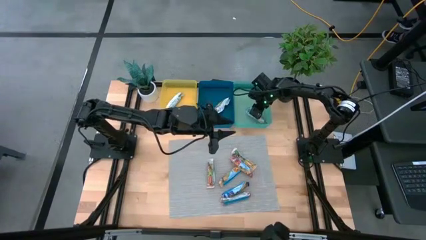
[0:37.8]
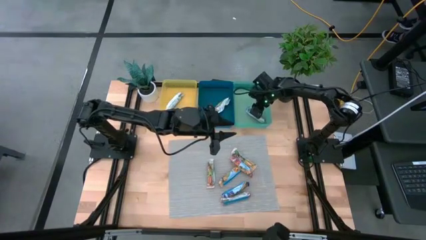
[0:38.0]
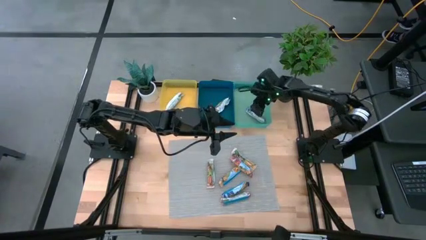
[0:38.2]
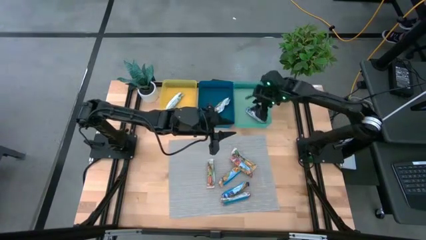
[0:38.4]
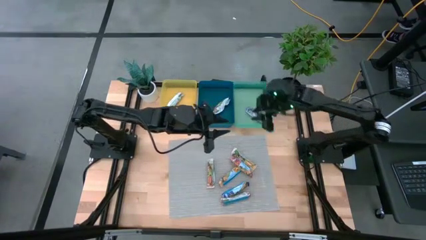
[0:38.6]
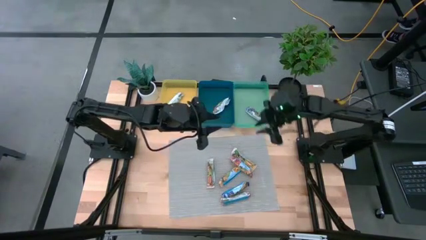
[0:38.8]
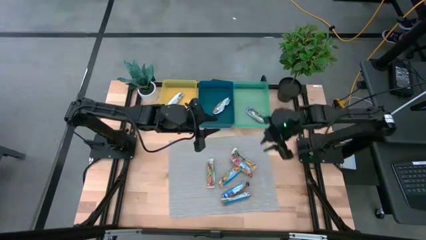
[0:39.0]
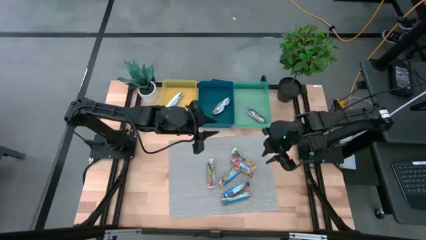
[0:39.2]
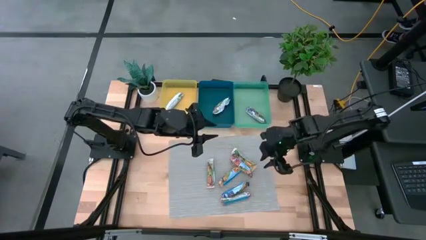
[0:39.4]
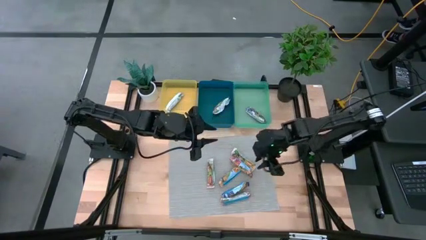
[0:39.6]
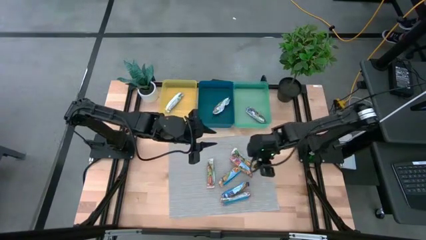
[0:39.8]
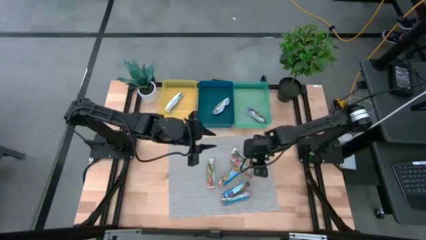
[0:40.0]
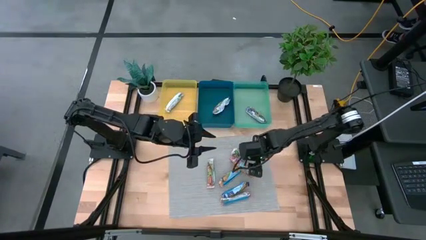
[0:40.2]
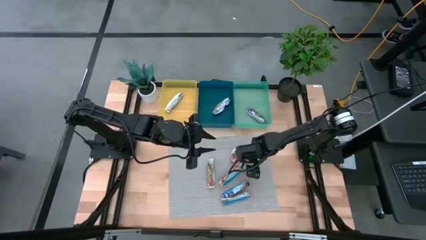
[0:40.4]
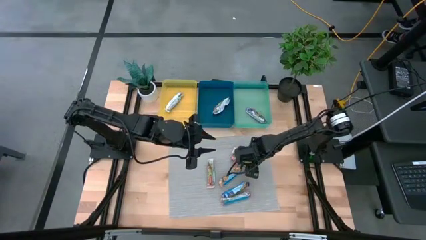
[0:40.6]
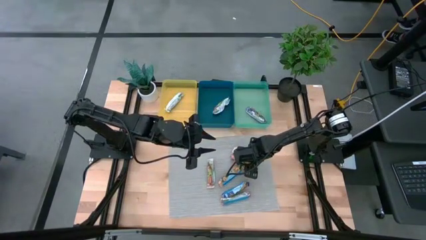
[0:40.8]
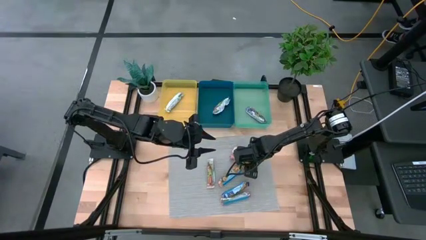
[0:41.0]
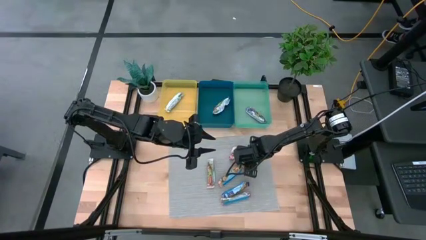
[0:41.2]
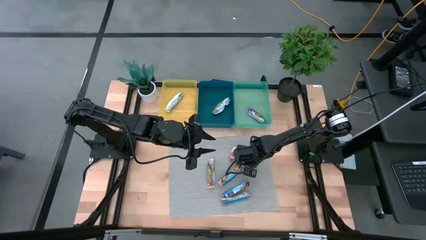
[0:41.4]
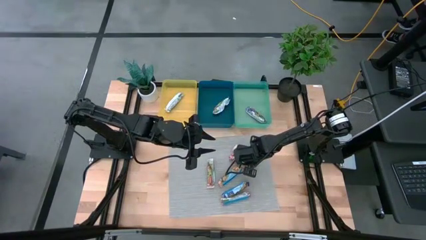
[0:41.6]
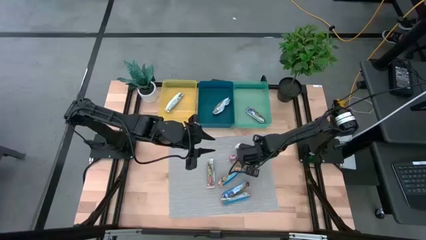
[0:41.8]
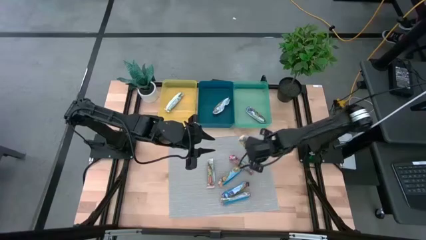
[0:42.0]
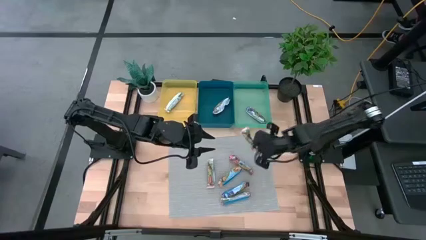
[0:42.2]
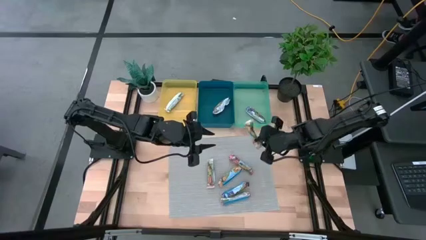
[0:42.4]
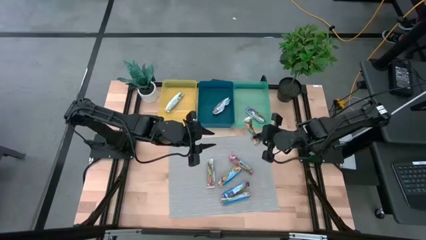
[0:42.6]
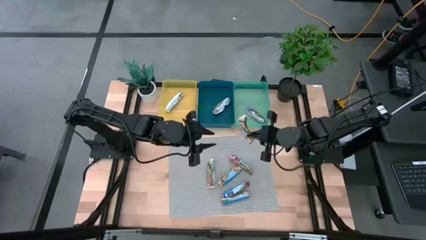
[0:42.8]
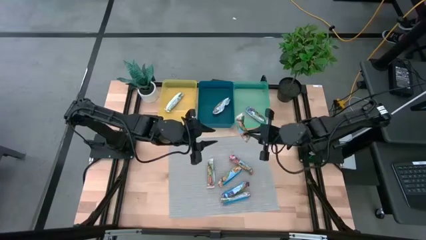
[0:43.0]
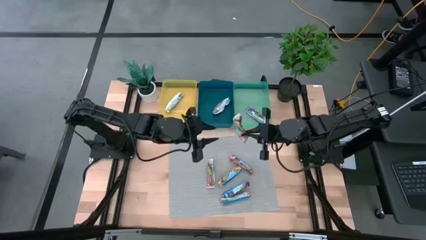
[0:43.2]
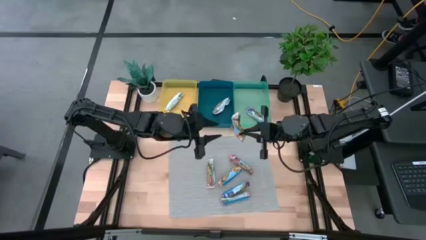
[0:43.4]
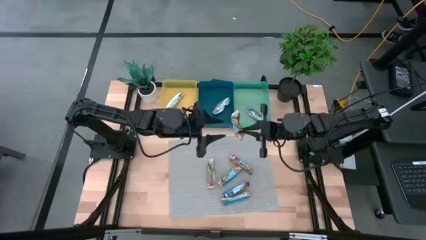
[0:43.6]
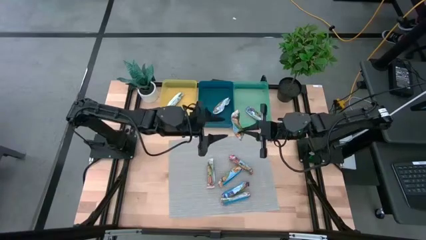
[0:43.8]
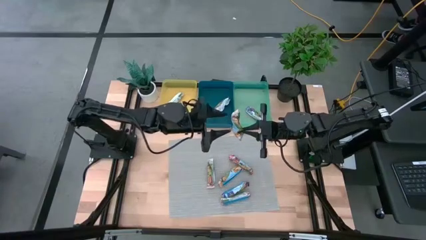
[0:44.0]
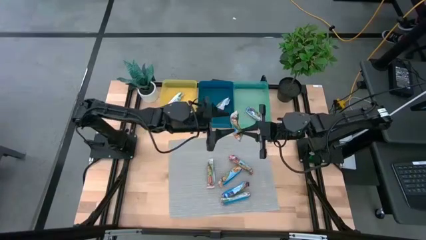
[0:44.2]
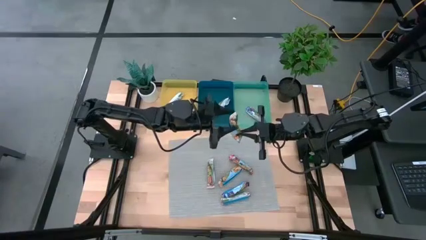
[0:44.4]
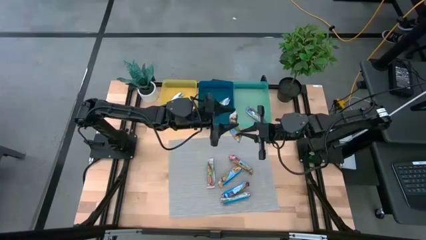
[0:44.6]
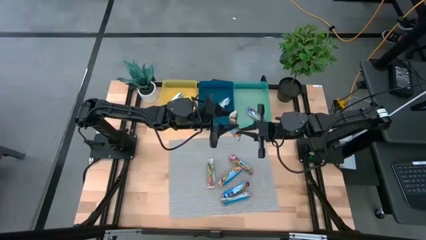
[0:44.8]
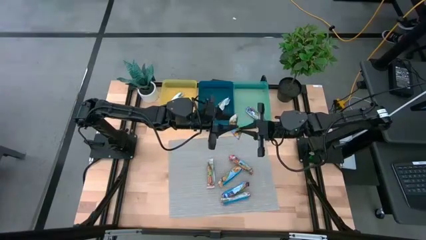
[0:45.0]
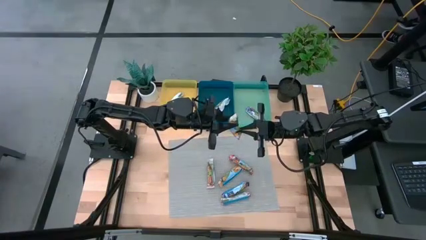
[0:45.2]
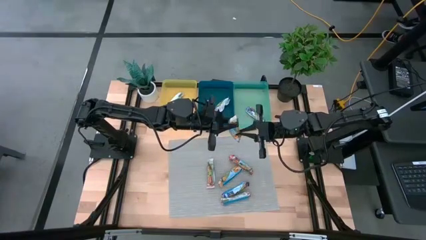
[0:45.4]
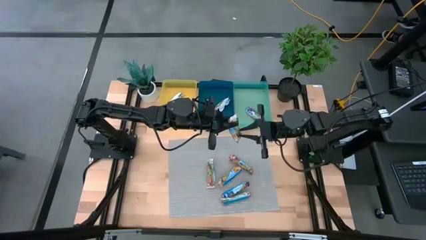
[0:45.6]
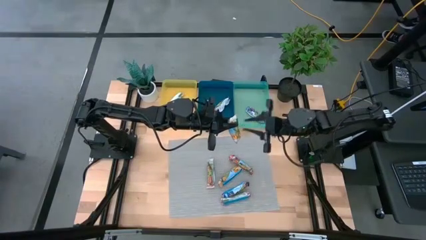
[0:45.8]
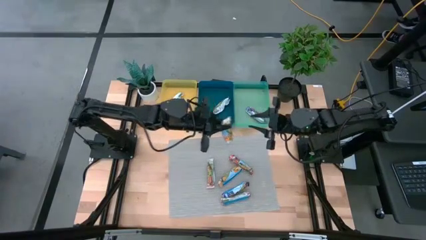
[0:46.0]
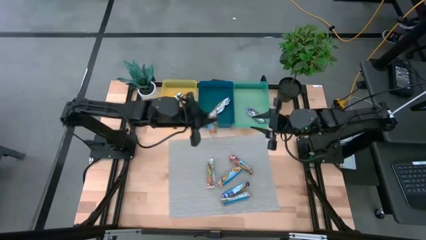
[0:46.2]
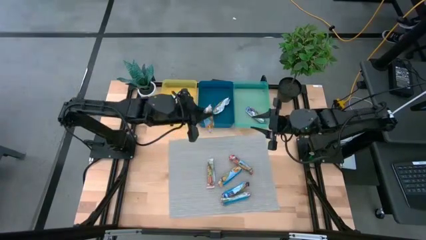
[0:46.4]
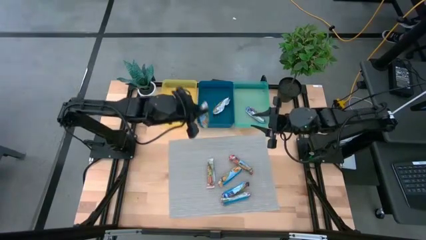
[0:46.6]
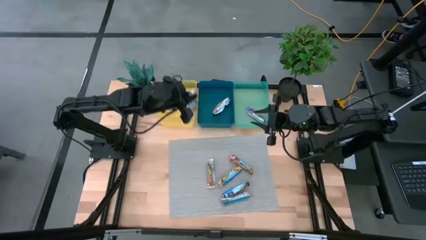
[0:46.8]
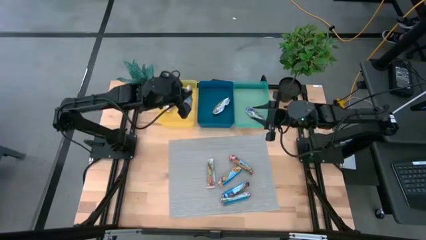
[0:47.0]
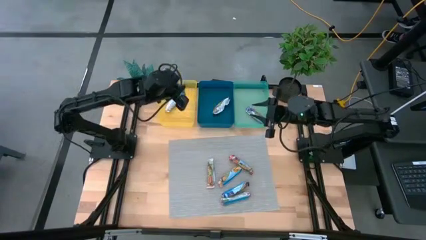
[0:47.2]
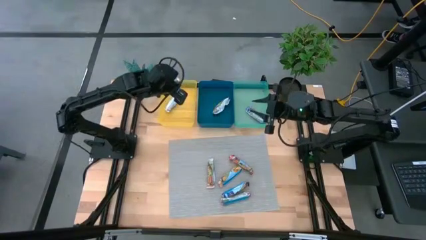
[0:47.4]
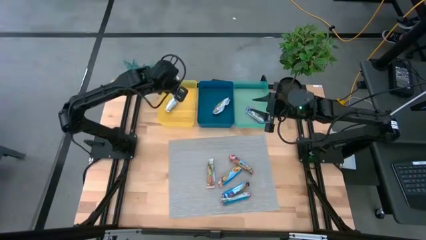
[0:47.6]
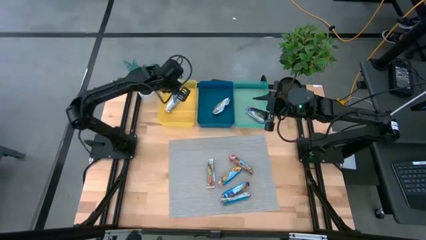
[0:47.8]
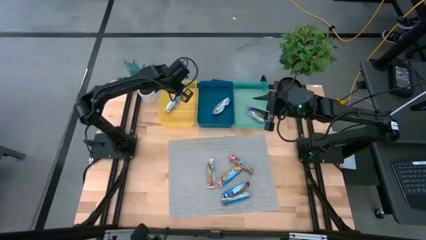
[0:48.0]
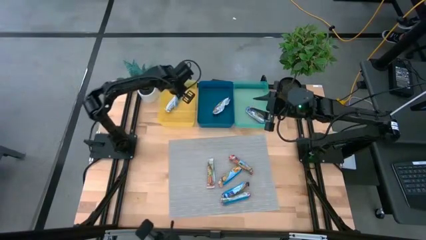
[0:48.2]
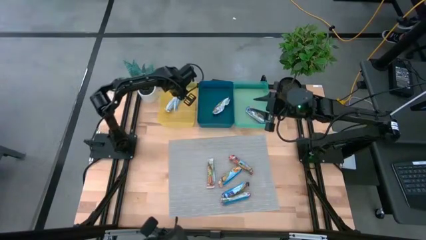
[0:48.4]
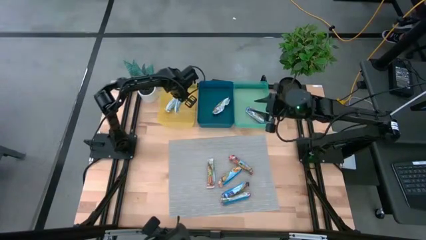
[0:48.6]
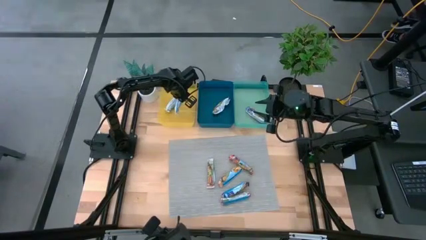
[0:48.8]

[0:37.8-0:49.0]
Task: Pick and place Granola Bars by type
Put the yellow granola bar into the yellow bin
